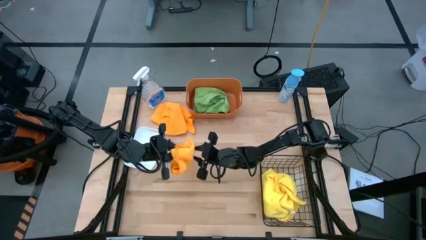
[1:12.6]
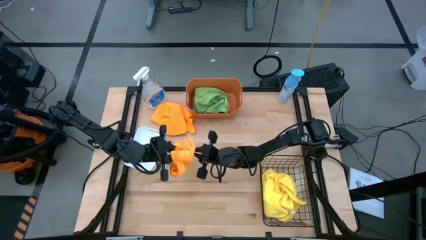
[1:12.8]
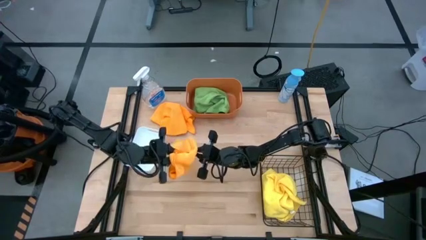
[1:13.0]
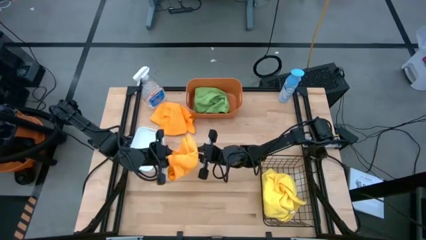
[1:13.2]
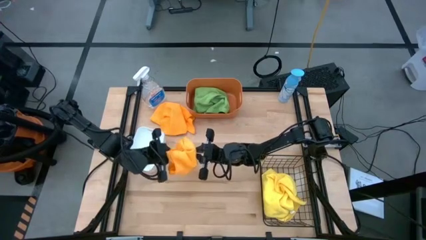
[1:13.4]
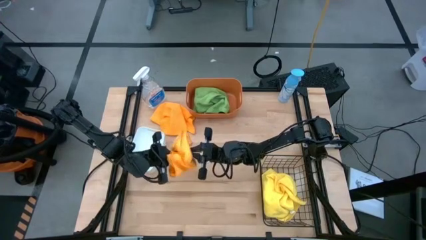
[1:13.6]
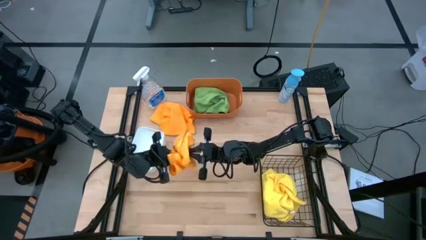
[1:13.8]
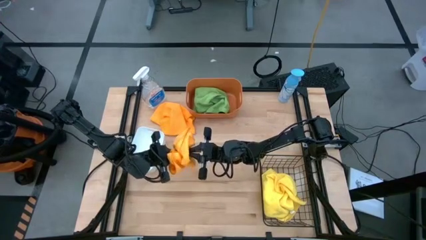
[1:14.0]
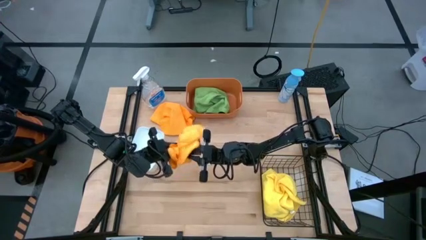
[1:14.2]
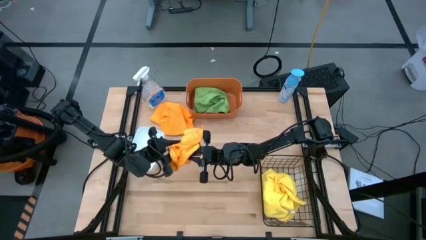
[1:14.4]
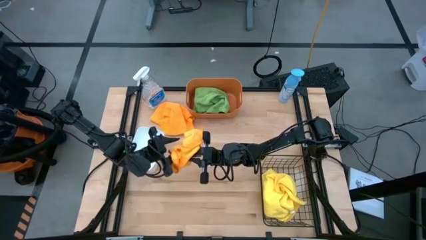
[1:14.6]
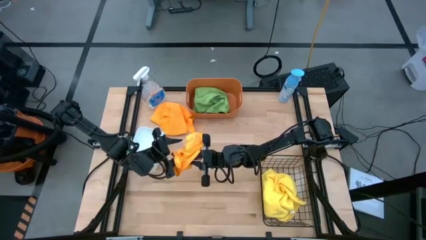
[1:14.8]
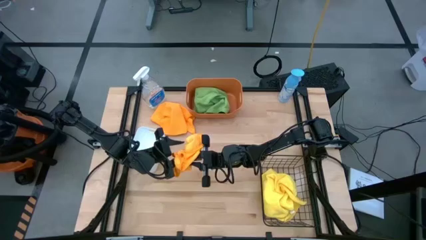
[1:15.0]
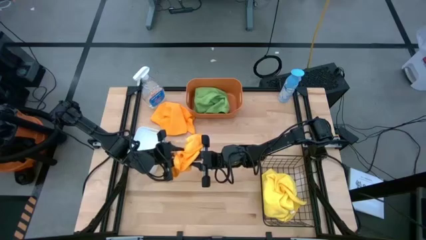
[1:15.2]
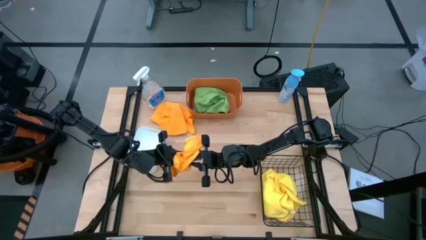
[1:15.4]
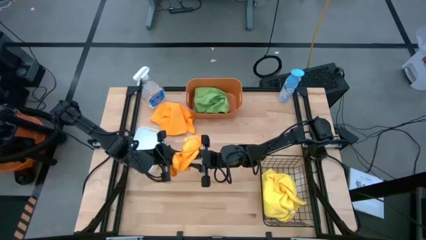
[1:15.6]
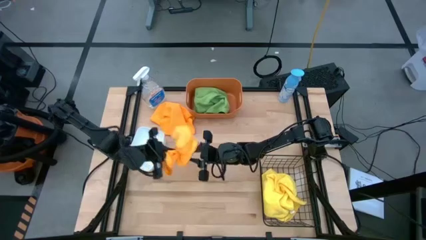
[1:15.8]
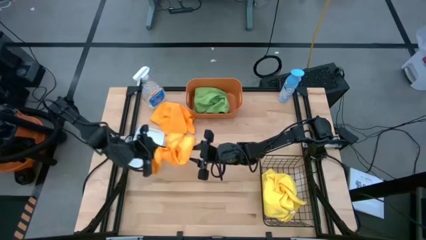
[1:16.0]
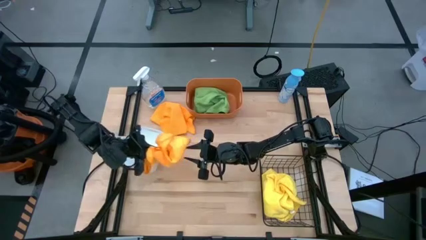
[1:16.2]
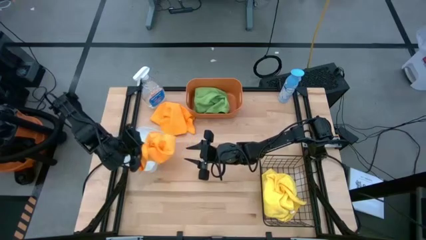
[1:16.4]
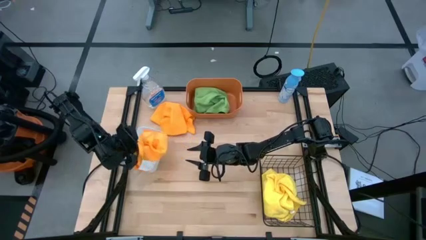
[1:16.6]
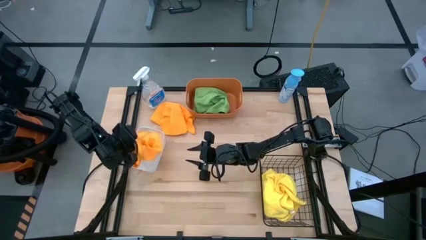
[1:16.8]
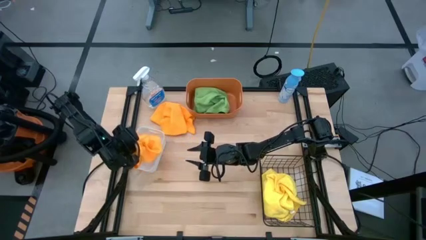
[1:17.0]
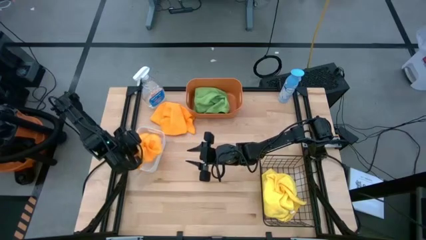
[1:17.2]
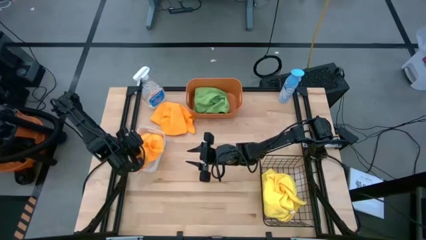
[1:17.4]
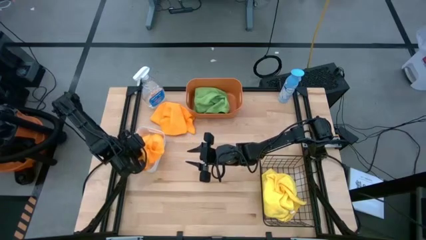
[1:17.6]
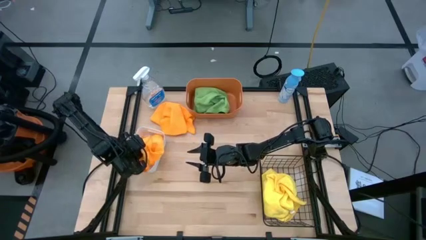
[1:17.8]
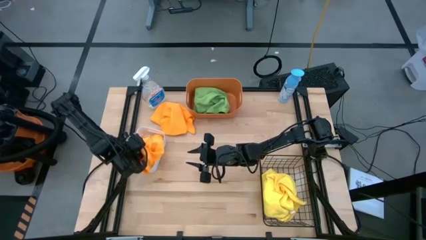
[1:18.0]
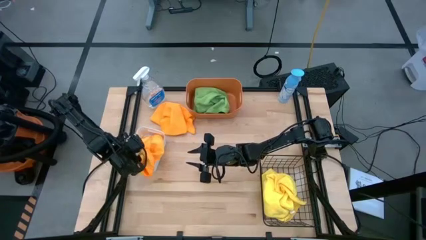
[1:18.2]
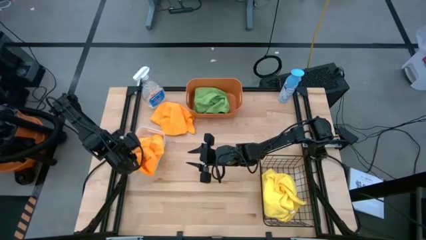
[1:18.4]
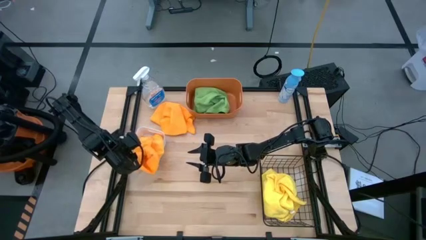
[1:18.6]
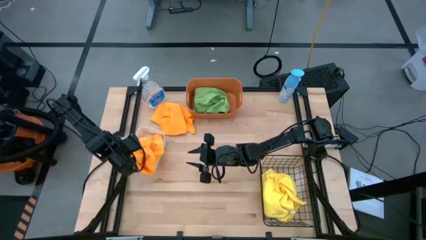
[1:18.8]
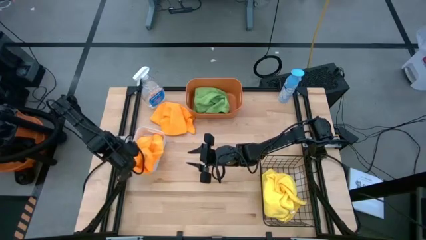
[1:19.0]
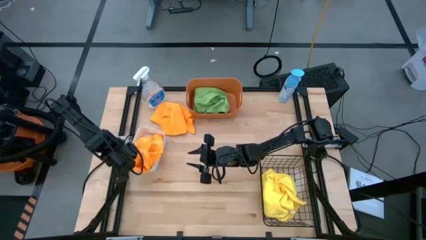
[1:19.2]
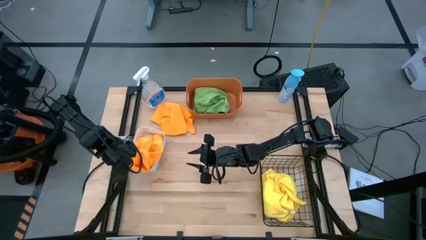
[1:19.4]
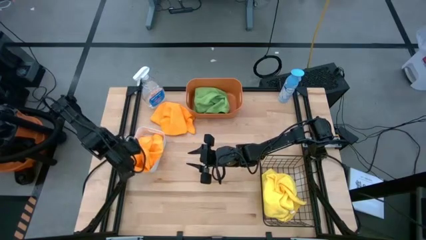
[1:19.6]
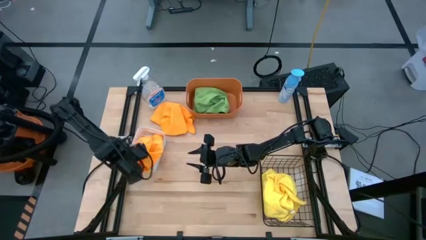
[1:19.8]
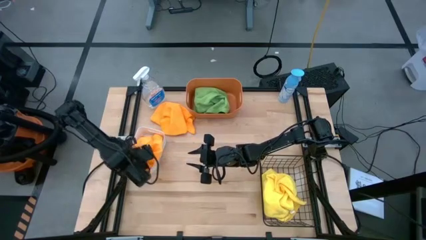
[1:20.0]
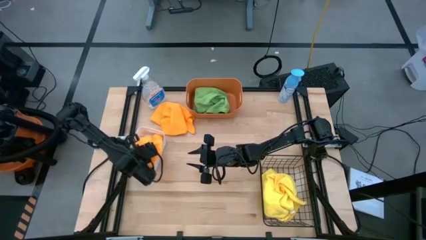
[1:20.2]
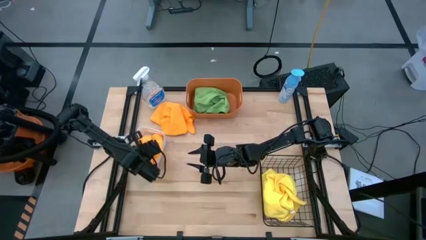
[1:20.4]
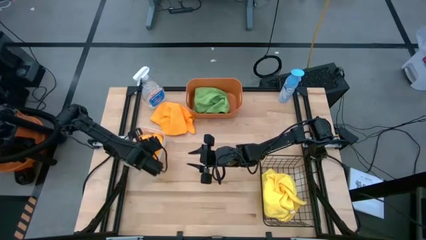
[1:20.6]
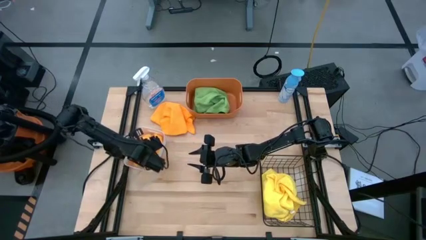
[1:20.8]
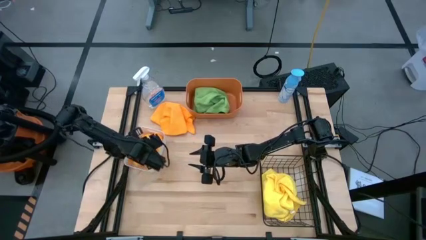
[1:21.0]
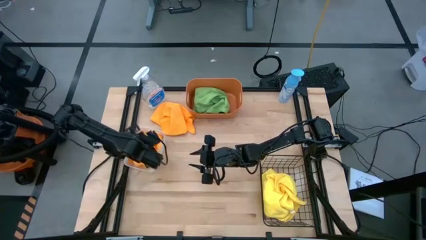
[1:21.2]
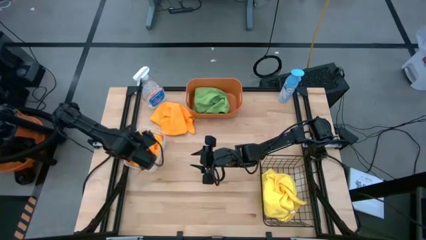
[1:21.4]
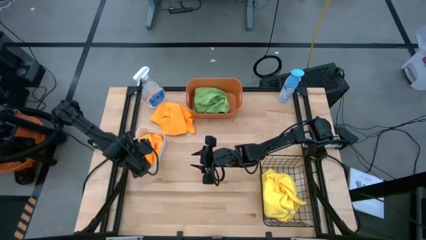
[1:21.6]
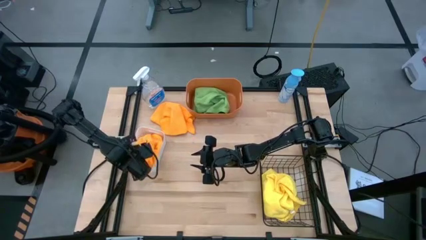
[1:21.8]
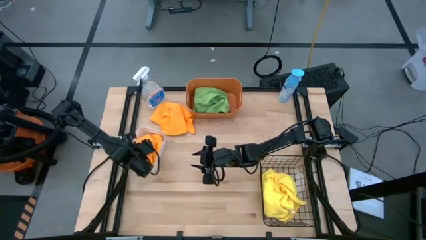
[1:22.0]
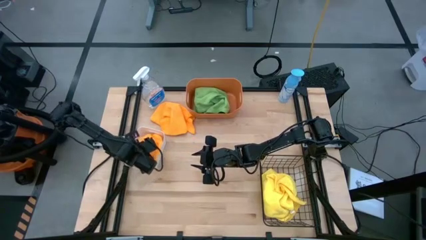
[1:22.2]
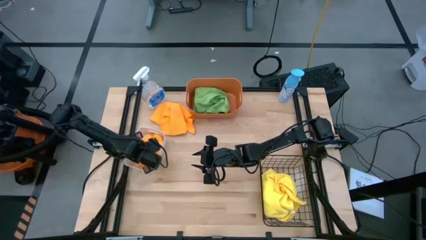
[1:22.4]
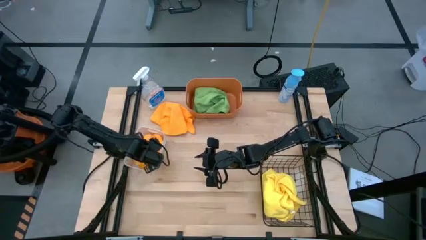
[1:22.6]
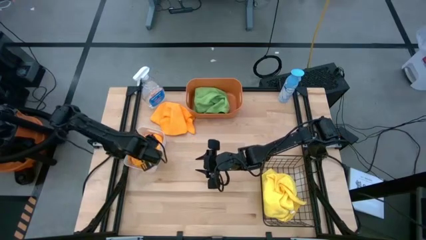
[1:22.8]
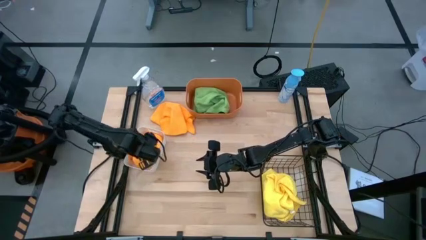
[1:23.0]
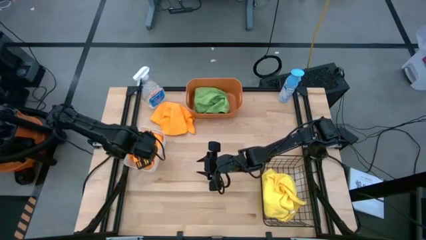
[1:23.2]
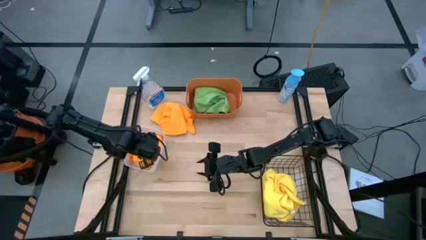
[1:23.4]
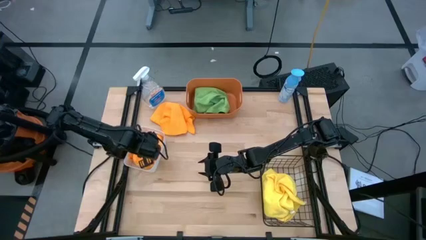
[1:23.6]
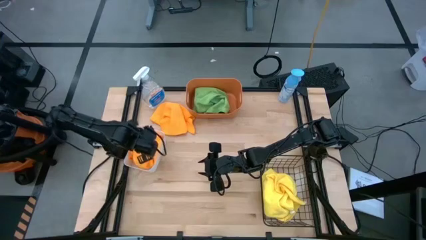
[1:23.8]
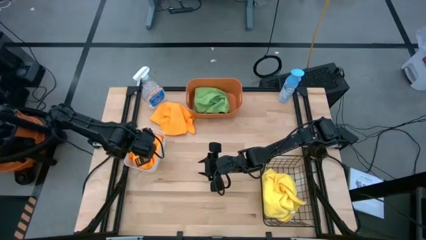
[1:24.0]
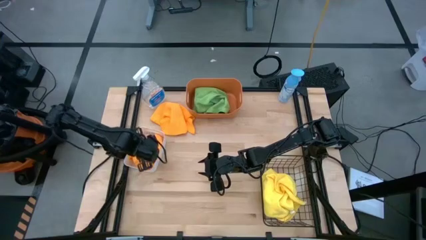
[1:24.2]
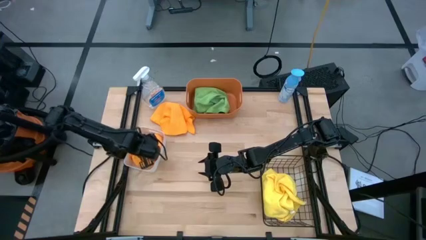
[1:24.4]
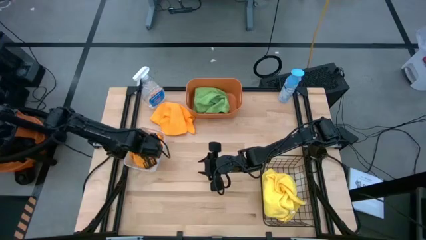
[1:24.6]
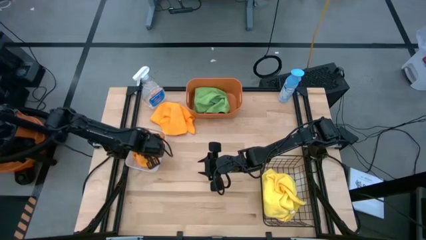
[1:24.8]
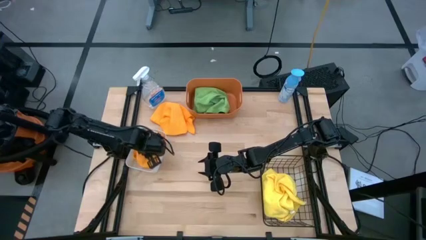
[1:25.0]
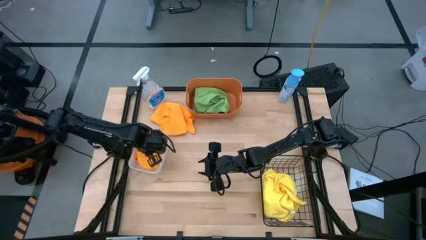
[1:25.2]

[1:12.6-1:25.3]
Task: Sort microfiber towel by color & place in baskets
Put the bottom orange microfiber cloth into the white bin

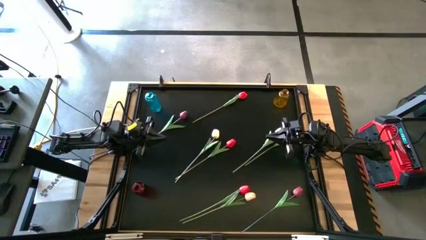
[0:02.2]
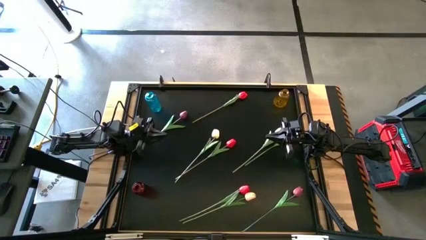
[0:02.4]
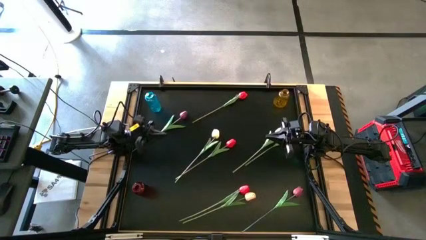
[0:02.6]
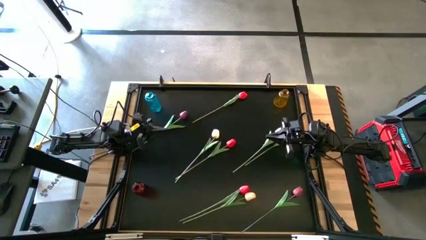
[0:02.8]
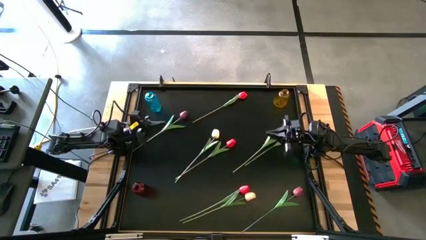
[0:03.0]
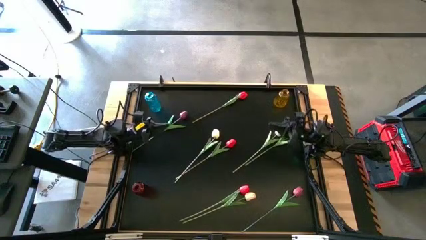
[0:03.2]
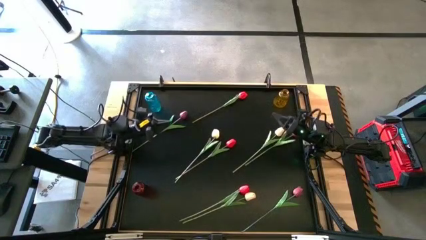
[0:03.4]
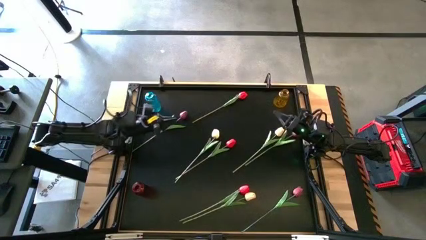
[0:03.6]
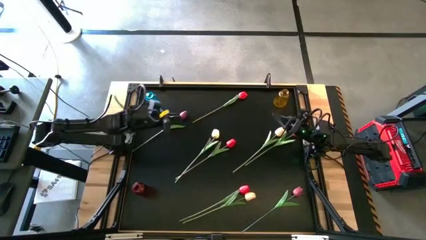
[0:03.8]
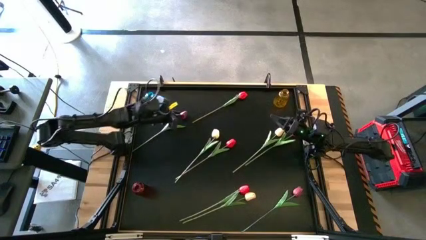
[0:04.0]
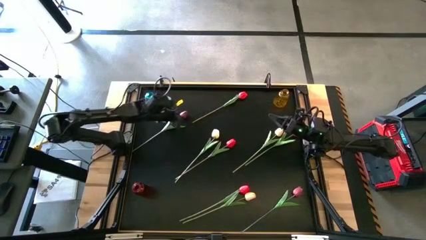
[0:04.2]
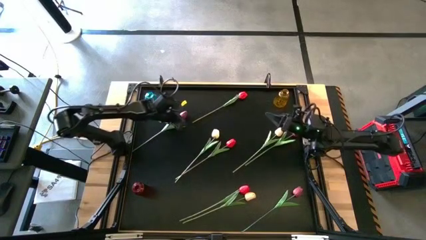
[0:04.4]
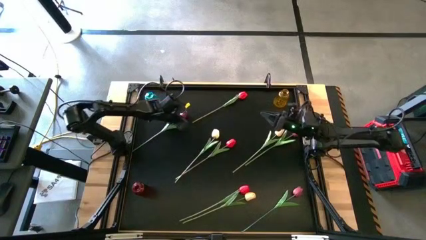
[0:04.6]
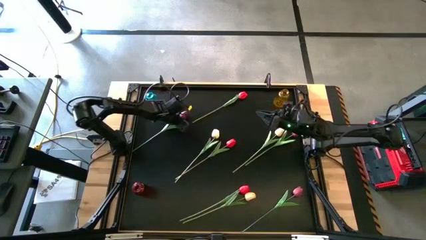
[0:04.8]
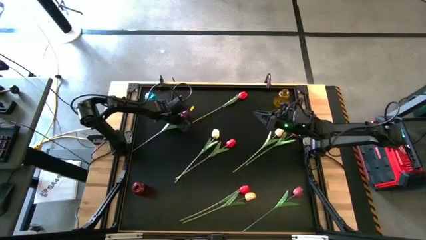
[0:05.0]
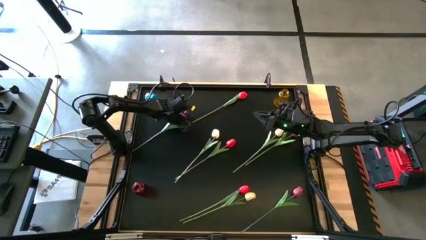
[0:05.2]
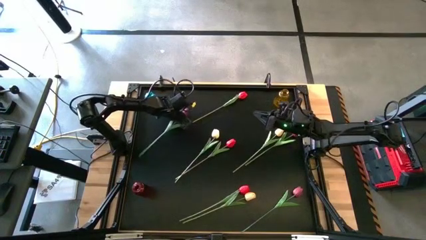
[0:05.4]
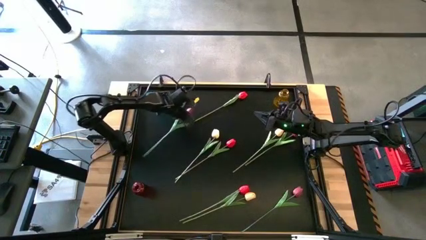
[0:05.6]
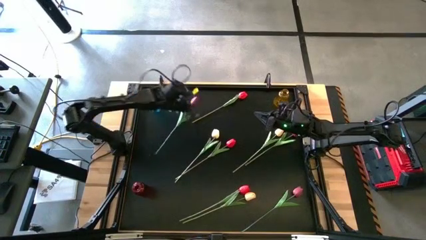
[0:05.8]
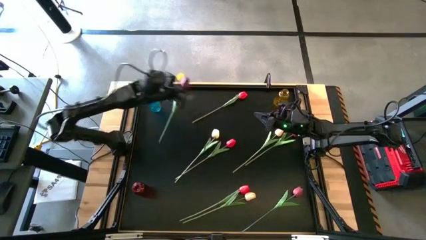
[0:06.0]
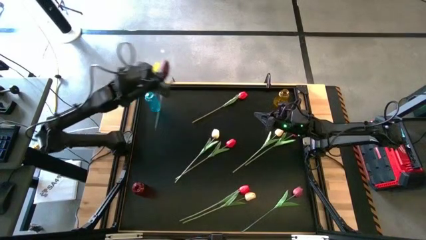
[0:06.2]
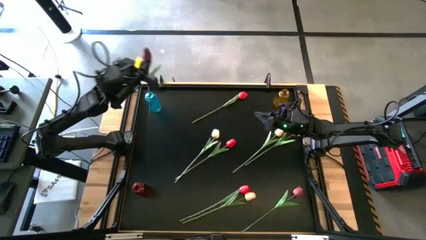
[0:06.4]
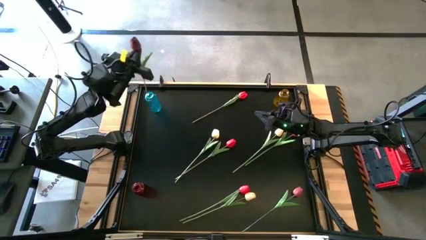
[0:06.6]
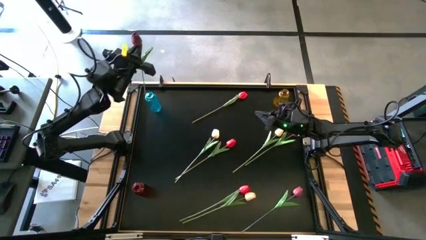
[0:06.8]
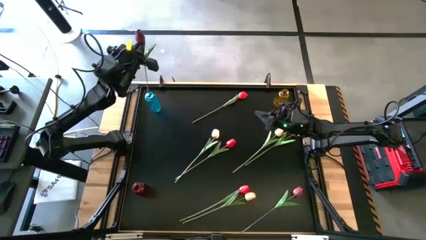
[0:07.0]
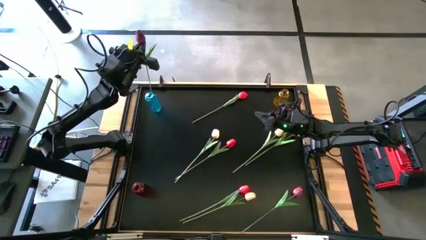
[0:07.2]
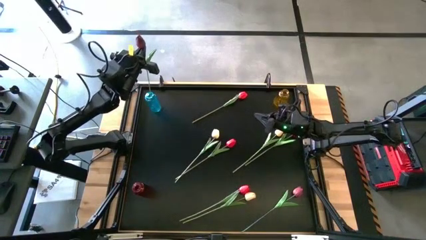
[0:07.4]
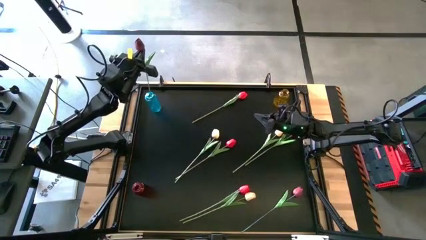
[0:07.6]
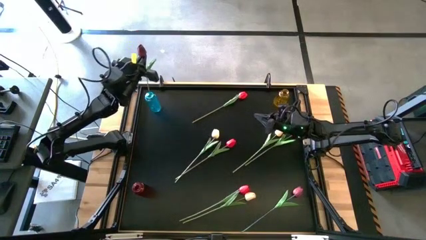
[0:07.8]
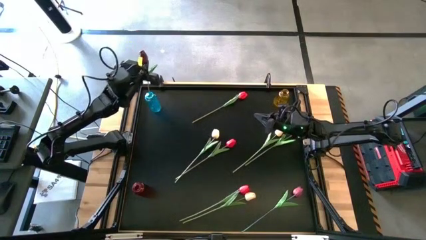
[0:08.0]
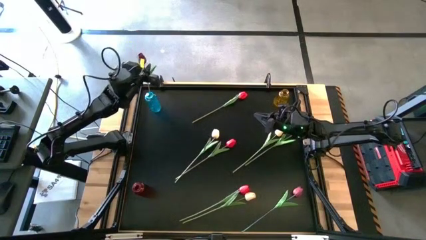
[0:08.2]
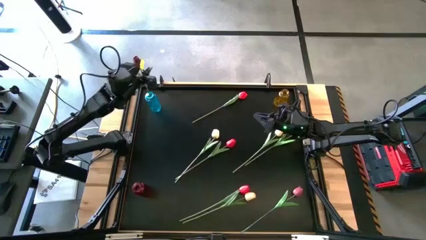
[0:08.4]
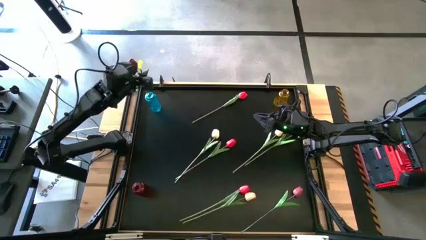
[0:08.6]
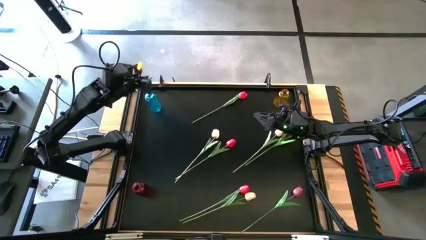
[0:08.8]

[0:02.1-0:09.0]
Task: Sort flowers into vase by color
Put the top left dark red flower into the blue vase
